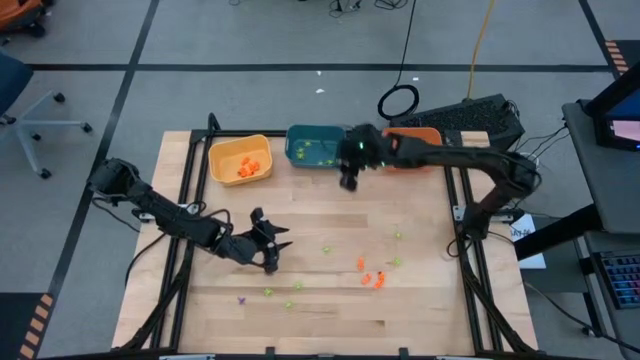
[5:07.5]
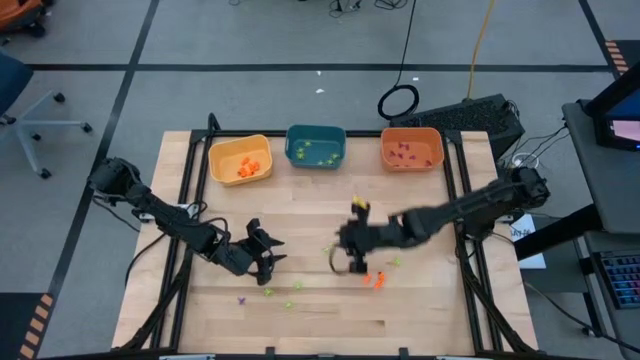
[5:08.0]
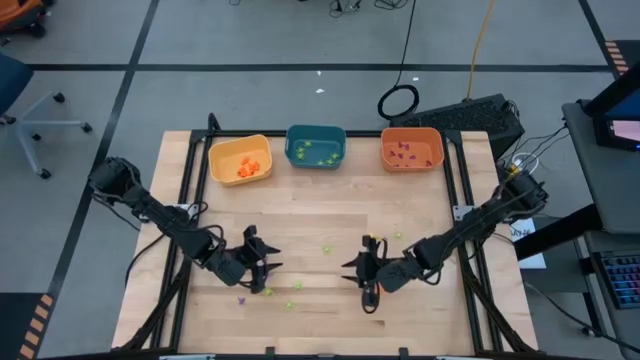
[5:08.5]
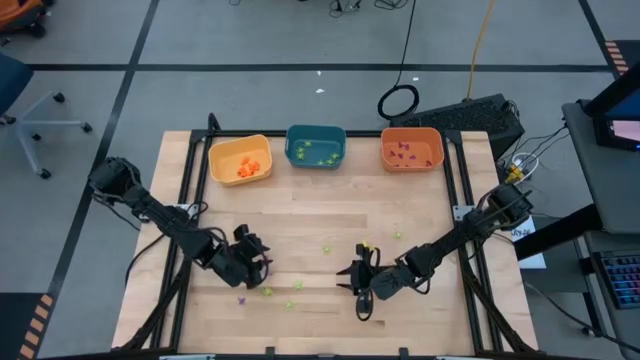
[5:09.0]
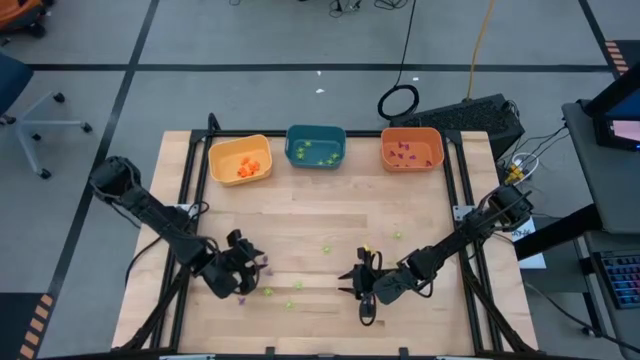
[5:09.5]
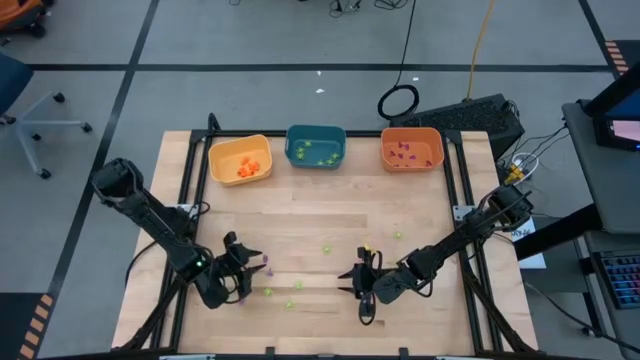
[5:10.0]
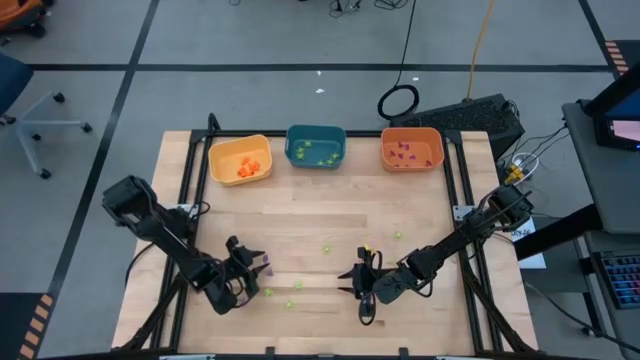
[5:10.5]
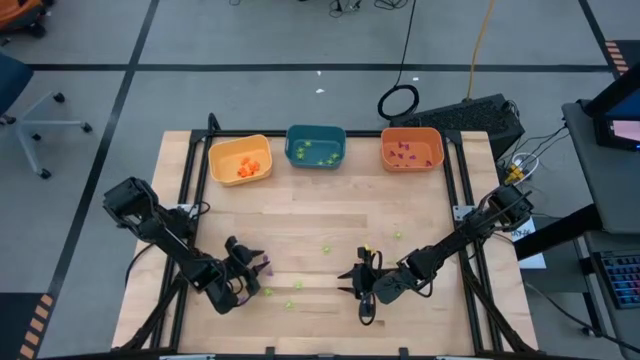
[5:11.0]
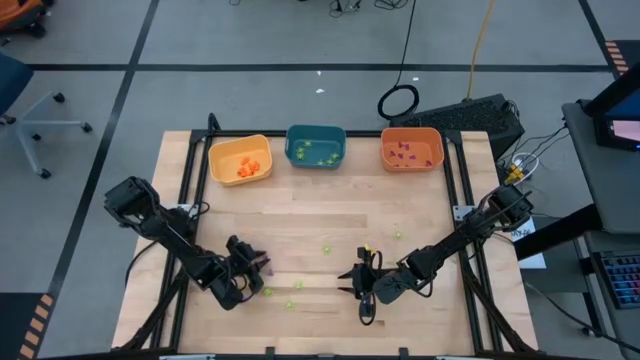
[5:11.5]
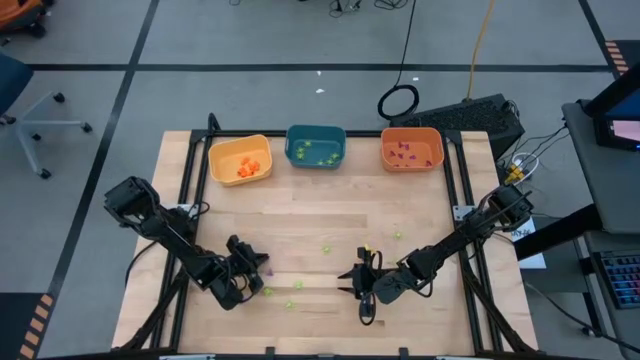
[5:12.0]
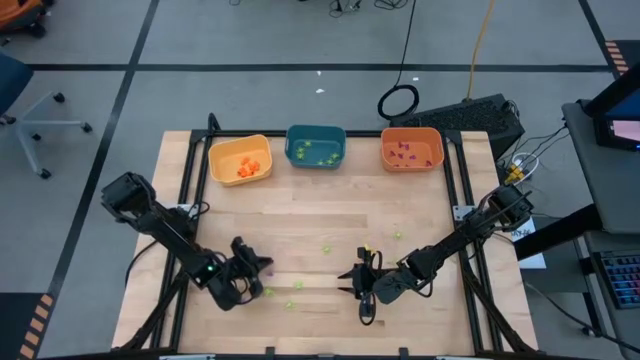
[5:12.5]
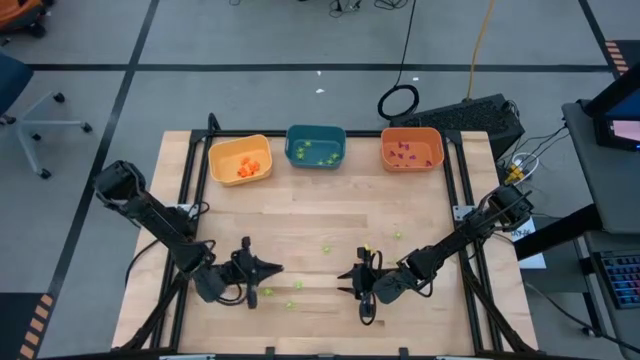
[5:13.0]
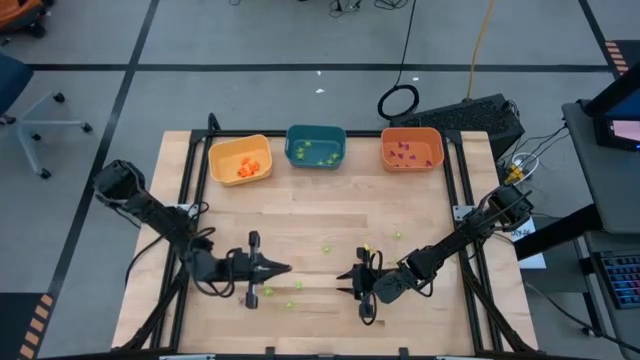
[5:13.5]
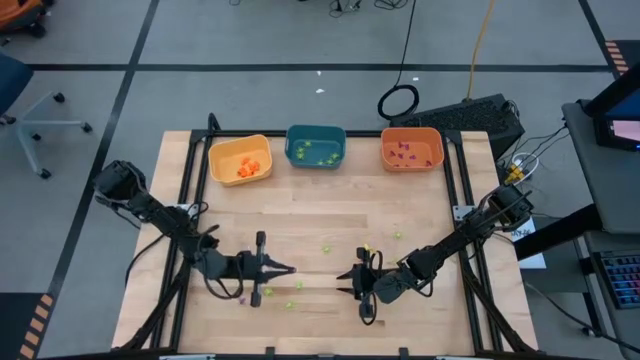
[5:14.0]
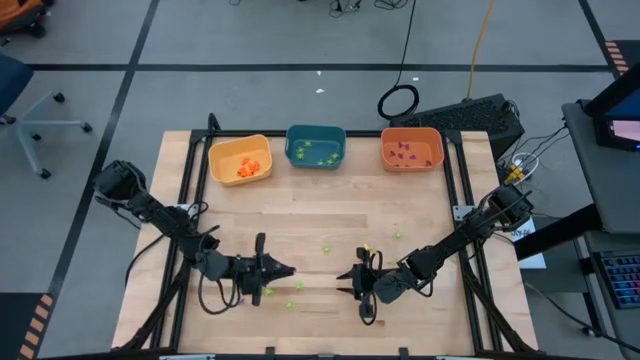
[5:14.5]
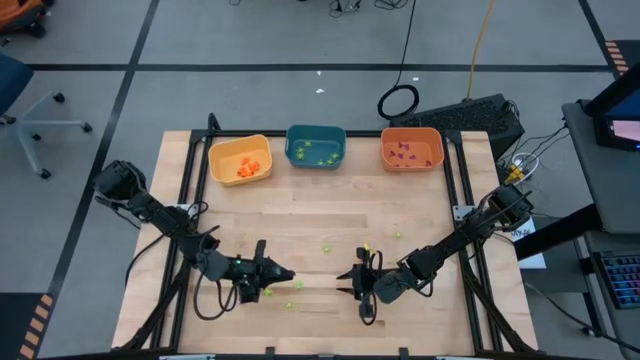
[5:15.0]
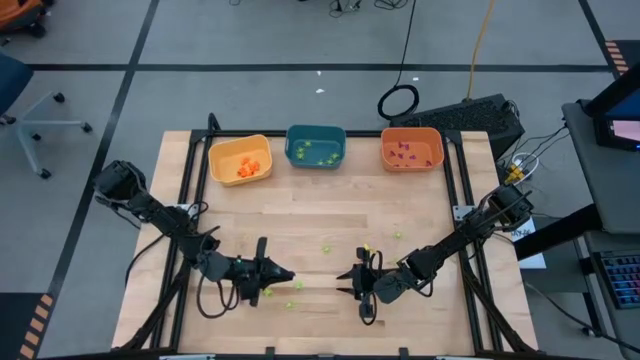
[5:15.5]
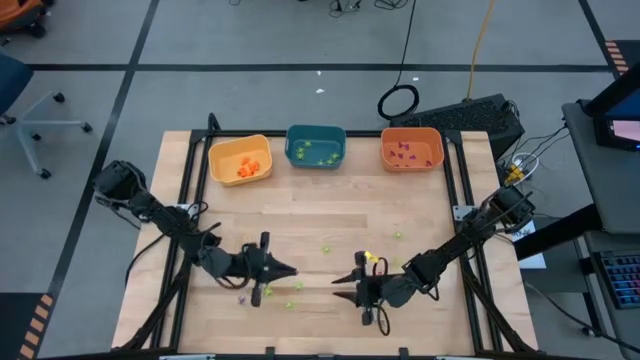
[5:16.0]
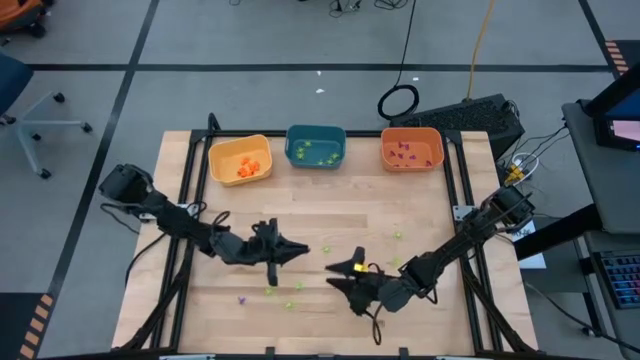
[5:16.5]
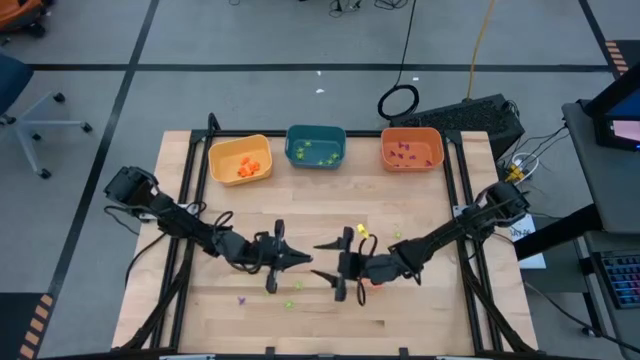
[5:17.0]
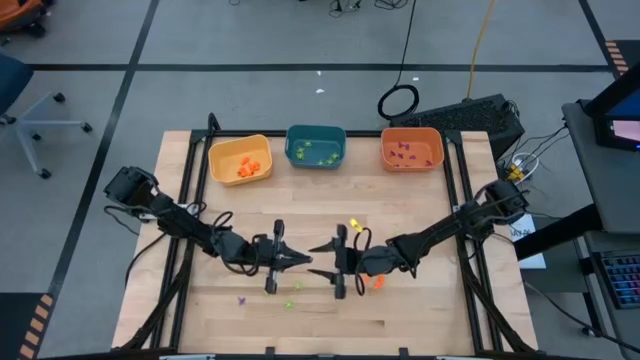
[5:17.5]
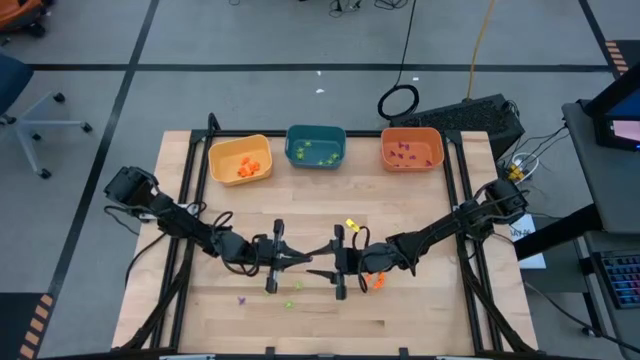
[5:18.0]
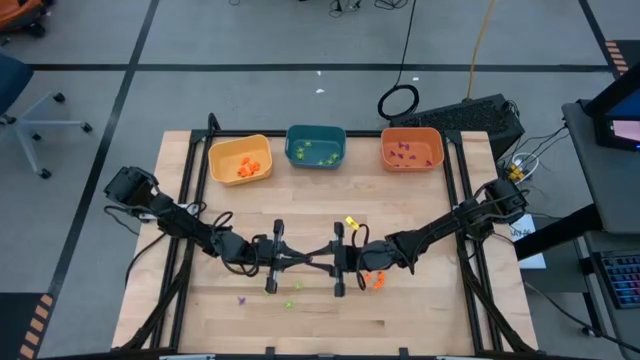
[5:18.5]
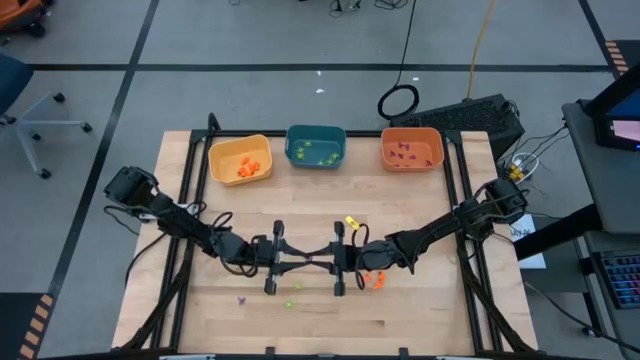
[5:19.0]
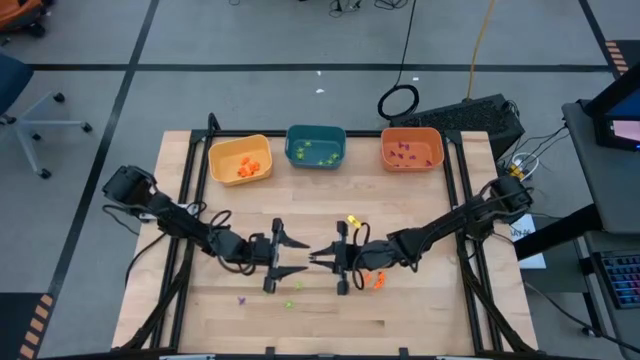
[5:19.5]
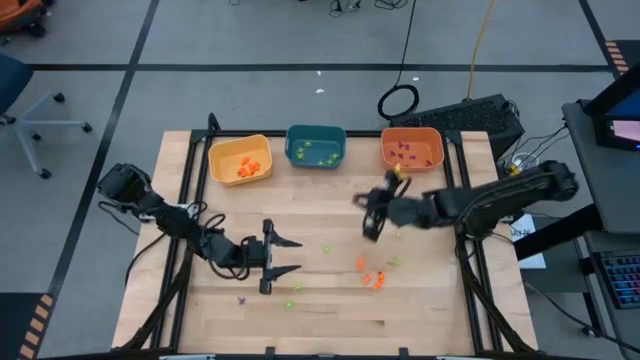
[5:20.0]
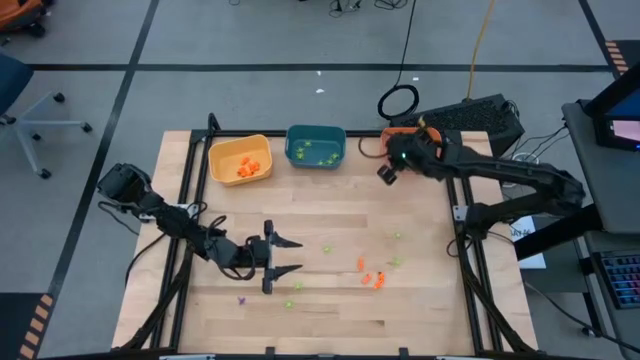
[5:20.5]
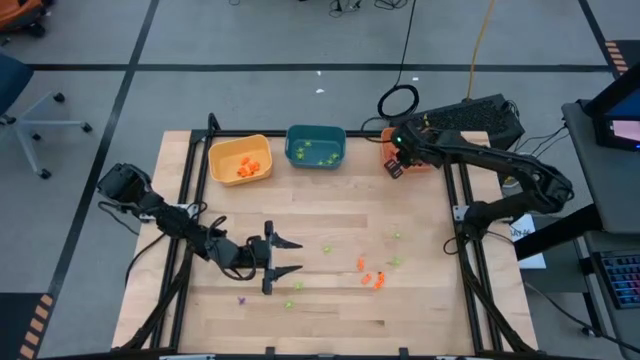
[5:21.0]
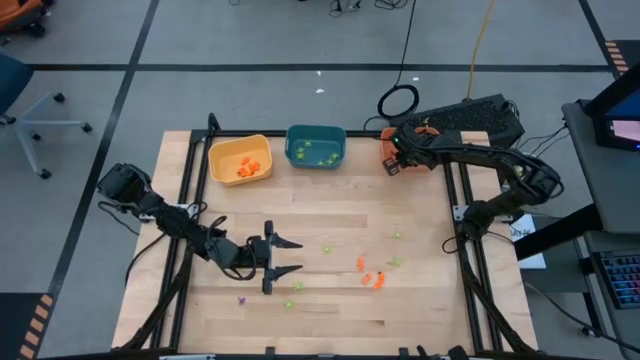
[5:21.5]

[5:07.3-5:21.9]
Task: Sort Halloween decoration
Put the violet witch hat toy into the orange bin

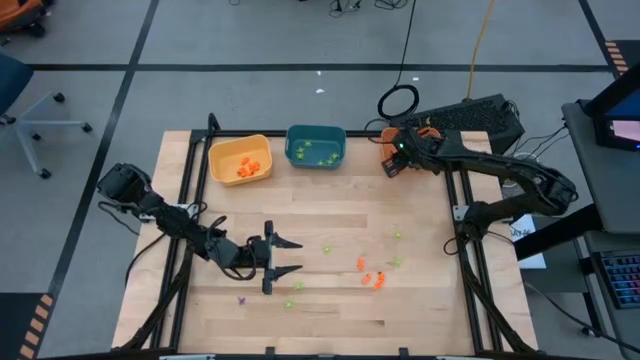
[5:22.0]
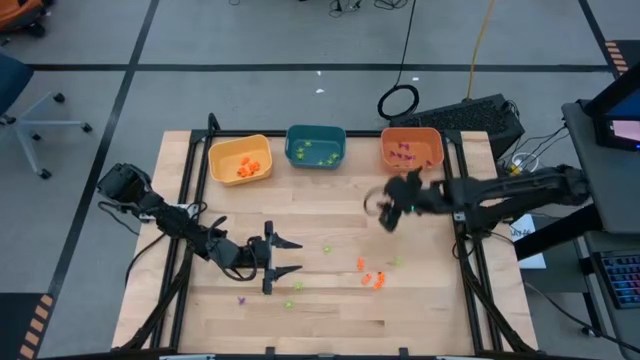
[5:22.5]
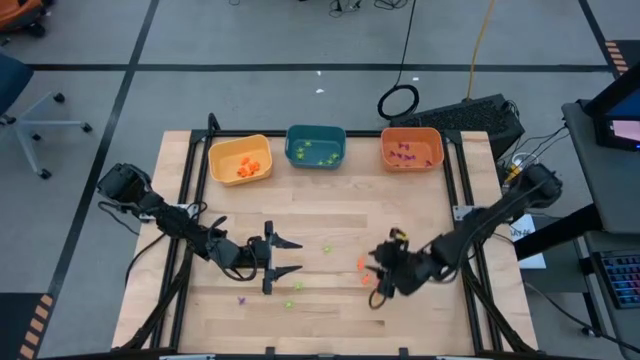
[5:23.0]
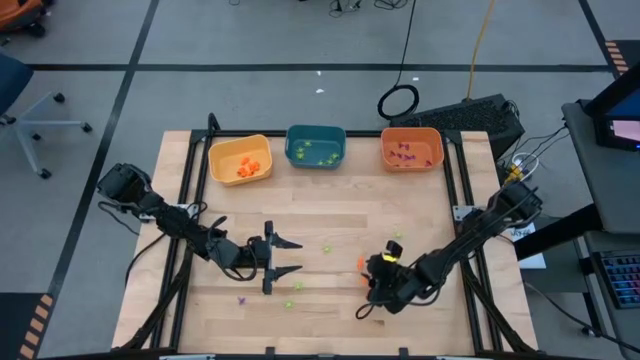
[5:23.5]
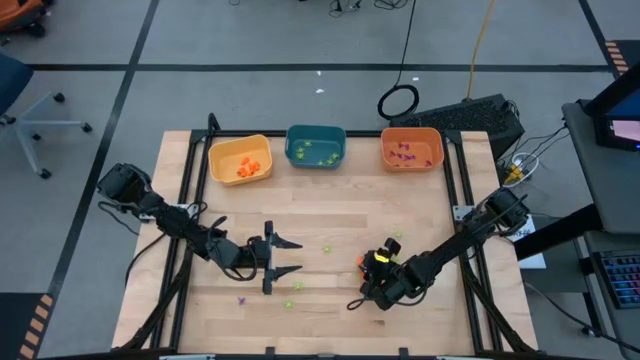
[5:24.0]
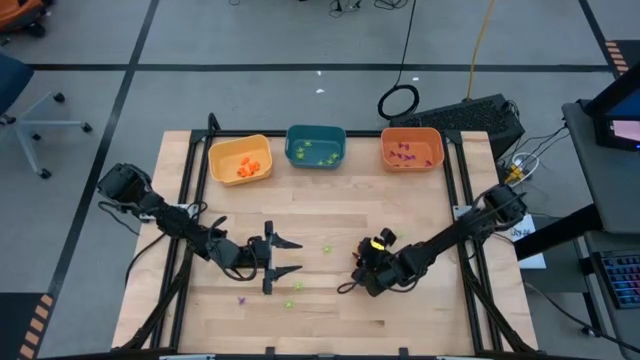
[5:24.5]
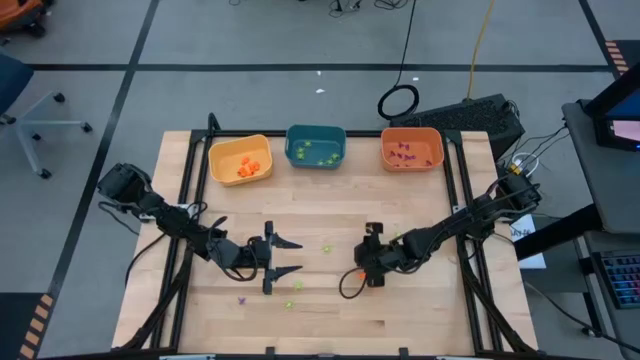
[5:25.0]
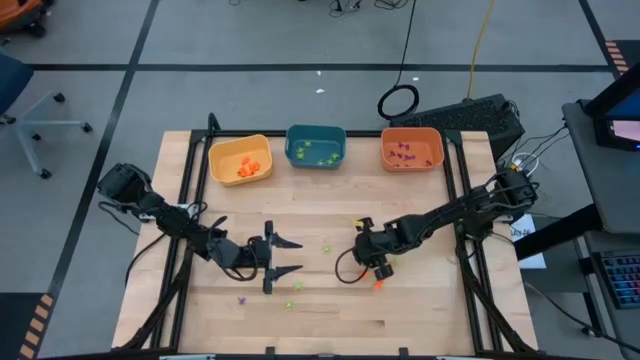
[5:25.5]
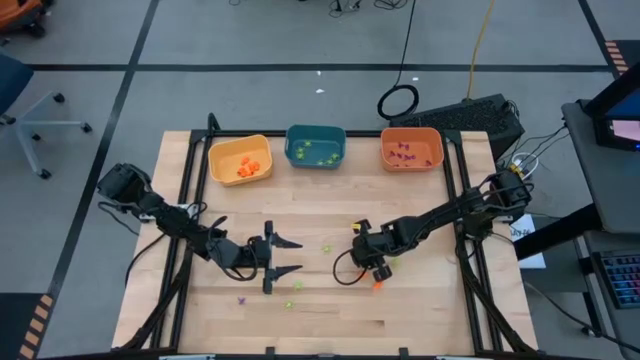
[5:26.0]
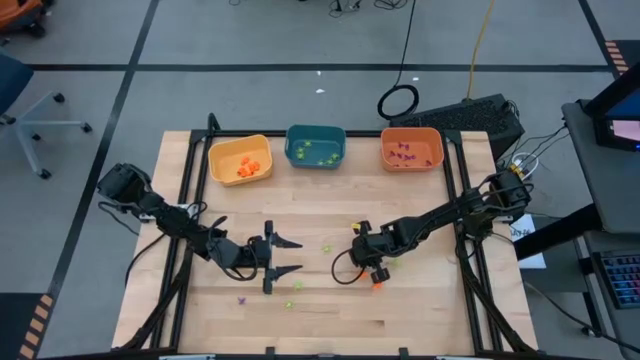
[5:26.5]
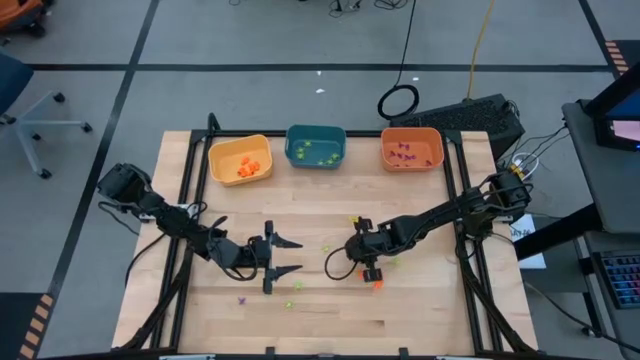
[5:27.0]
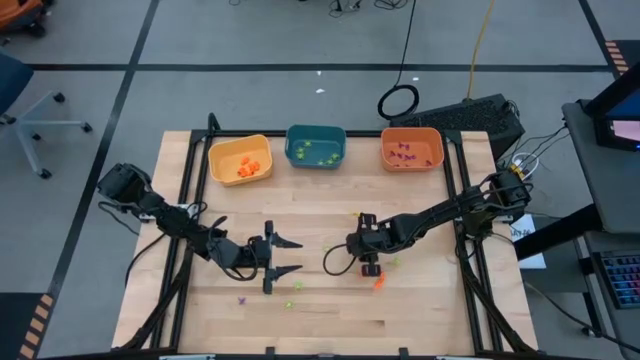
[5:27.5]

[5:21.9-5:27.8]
Put the orange skeleton toy into the yellow bin
